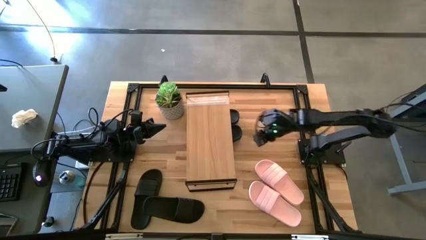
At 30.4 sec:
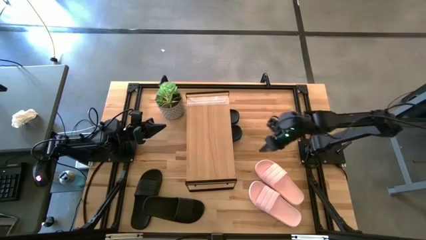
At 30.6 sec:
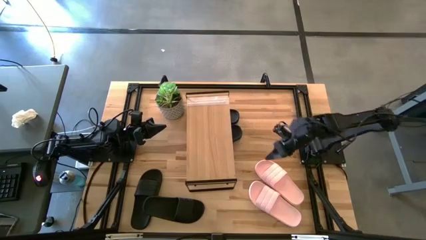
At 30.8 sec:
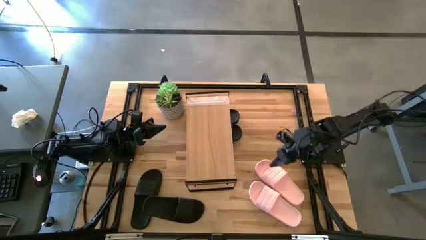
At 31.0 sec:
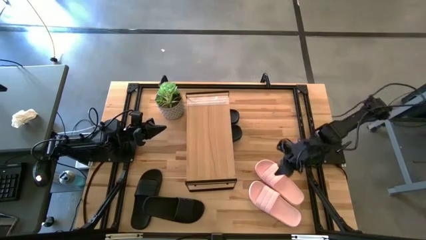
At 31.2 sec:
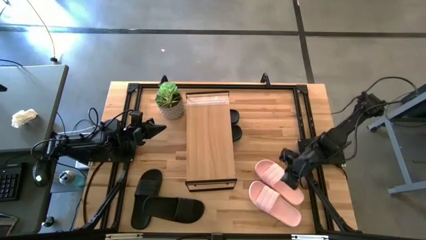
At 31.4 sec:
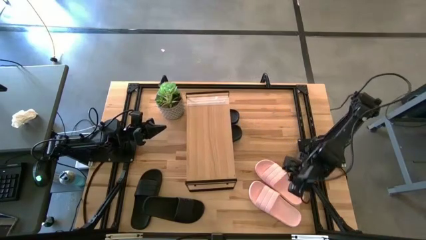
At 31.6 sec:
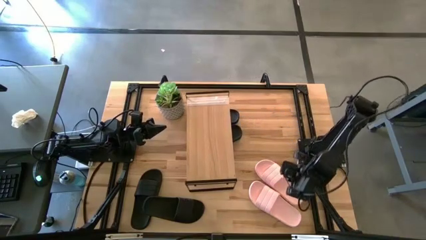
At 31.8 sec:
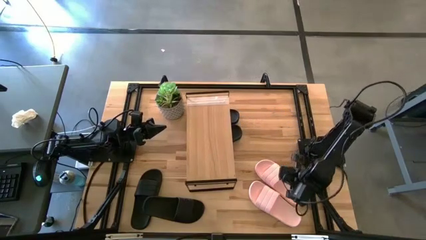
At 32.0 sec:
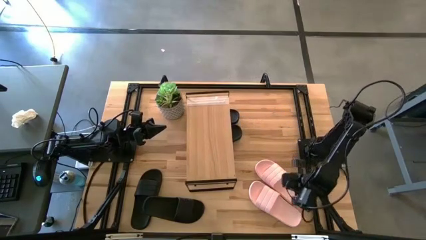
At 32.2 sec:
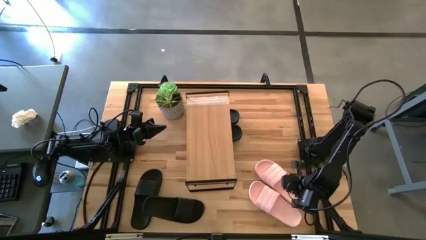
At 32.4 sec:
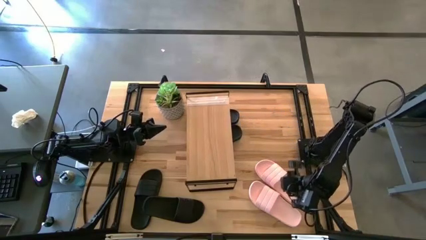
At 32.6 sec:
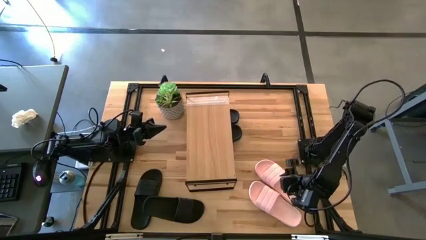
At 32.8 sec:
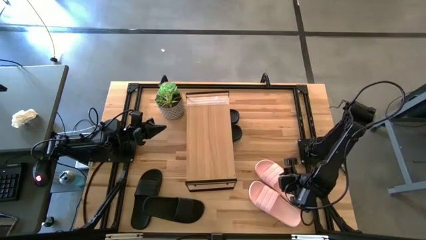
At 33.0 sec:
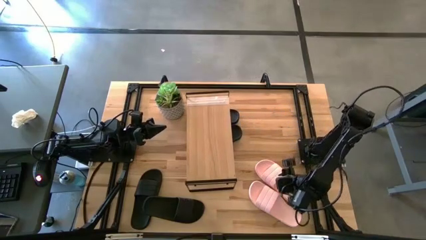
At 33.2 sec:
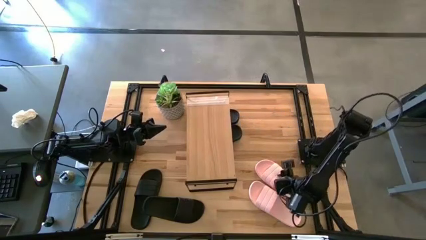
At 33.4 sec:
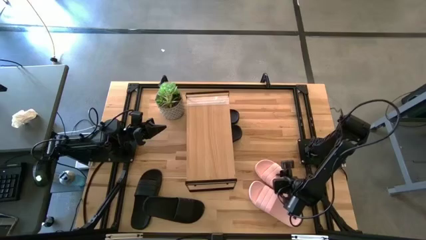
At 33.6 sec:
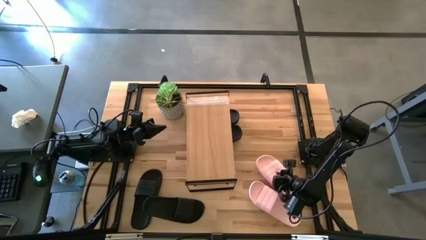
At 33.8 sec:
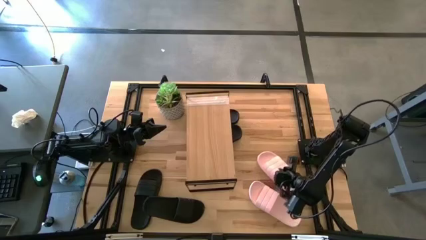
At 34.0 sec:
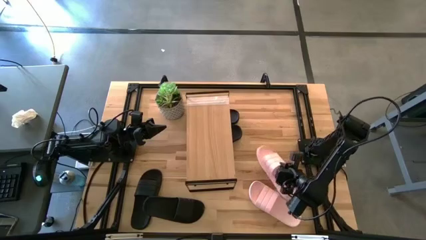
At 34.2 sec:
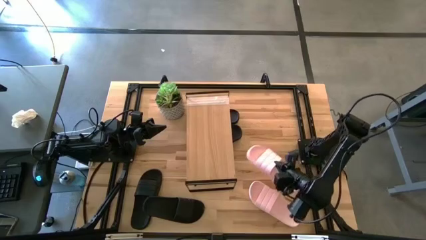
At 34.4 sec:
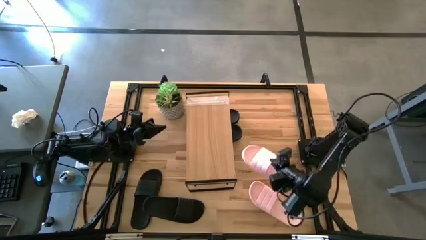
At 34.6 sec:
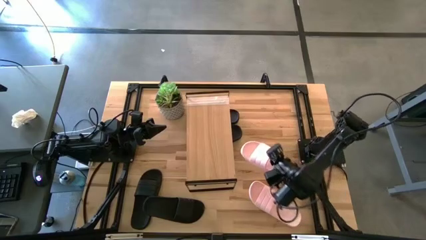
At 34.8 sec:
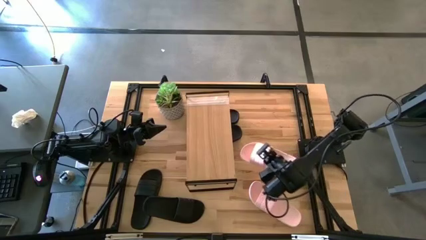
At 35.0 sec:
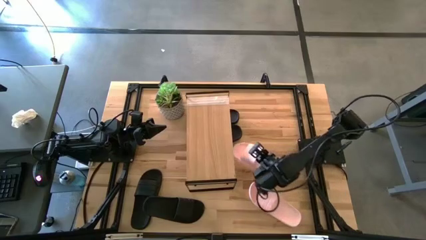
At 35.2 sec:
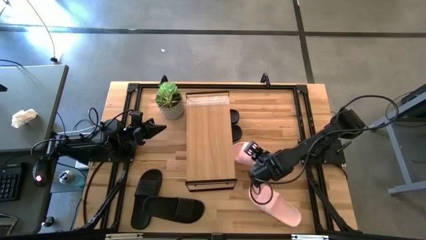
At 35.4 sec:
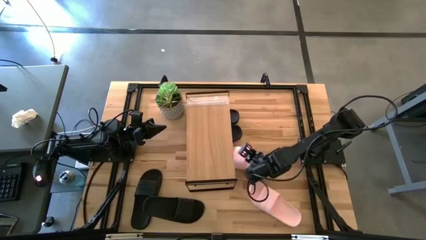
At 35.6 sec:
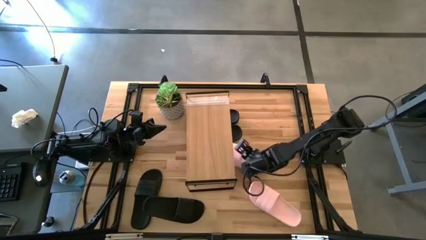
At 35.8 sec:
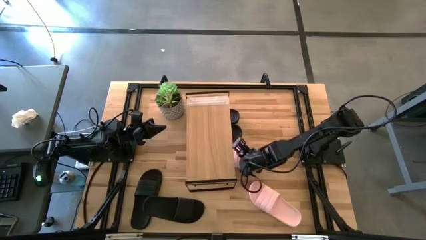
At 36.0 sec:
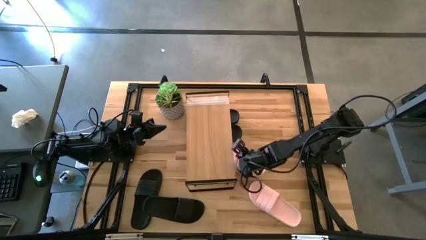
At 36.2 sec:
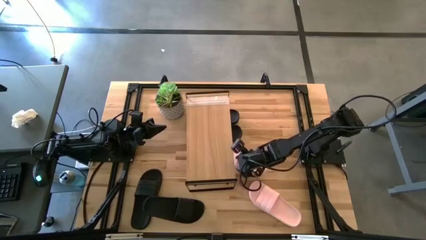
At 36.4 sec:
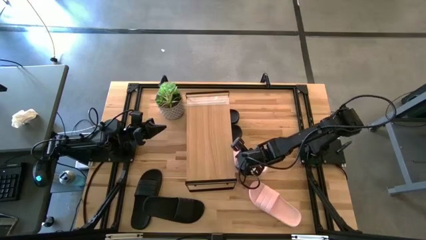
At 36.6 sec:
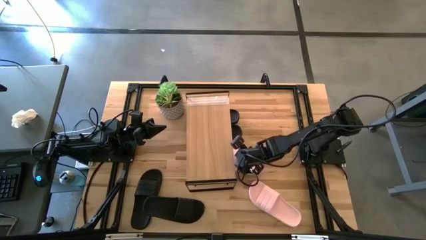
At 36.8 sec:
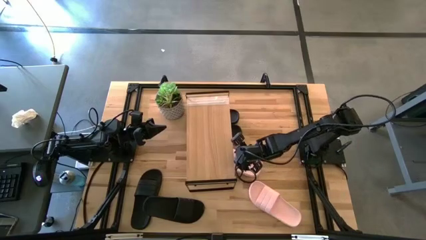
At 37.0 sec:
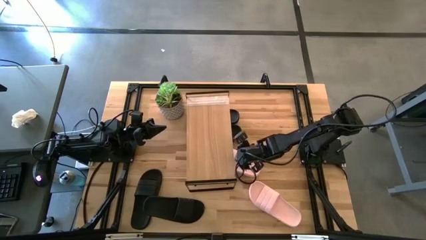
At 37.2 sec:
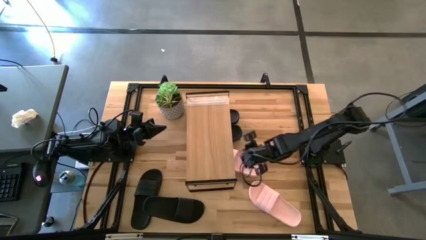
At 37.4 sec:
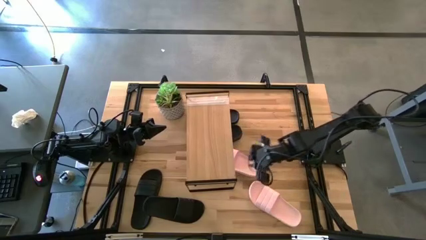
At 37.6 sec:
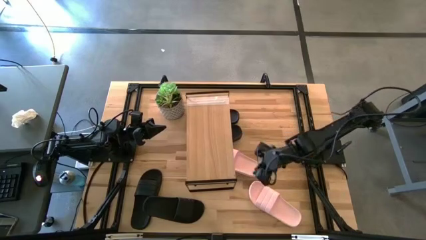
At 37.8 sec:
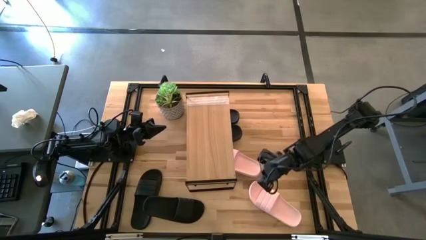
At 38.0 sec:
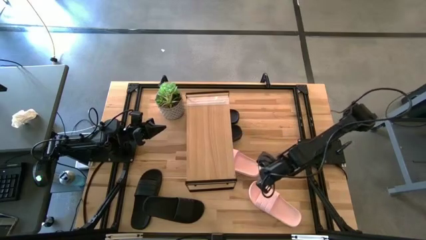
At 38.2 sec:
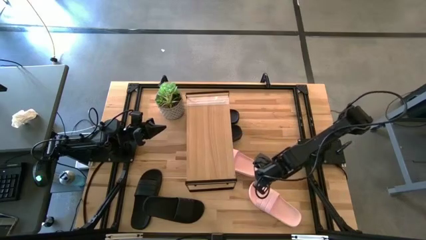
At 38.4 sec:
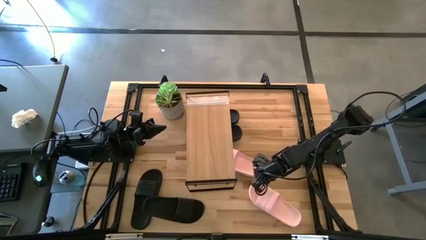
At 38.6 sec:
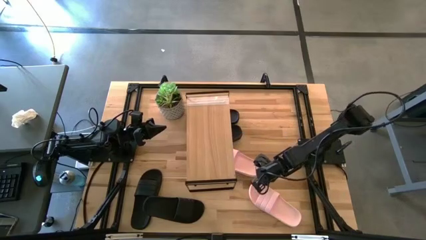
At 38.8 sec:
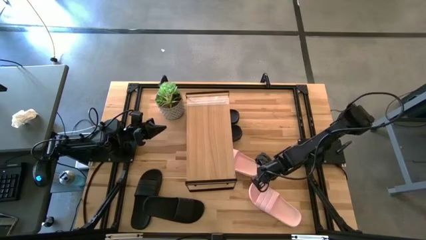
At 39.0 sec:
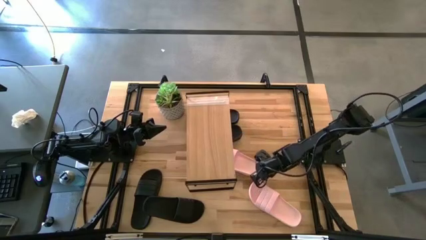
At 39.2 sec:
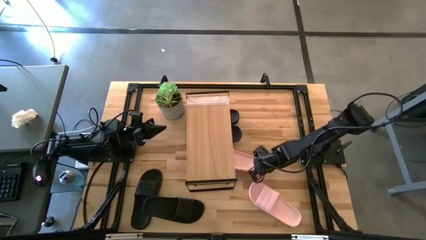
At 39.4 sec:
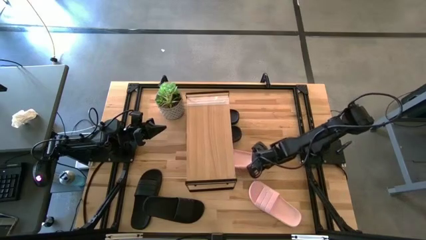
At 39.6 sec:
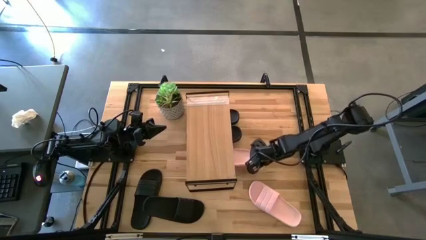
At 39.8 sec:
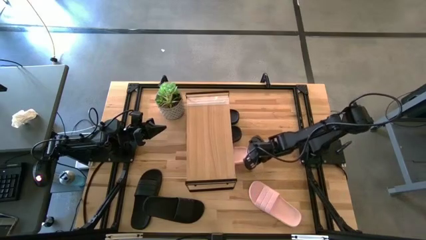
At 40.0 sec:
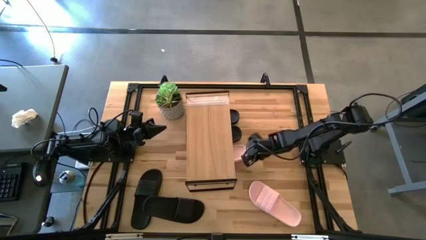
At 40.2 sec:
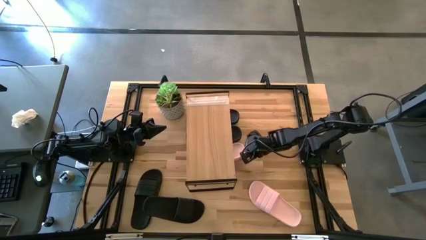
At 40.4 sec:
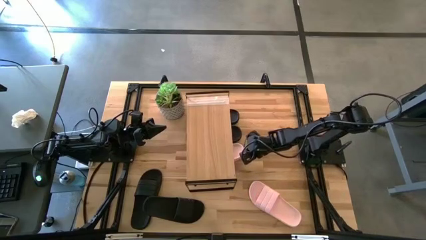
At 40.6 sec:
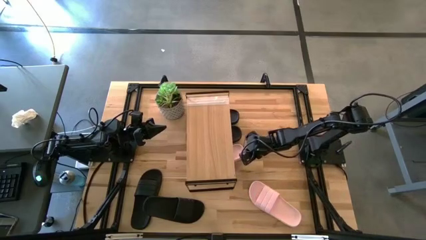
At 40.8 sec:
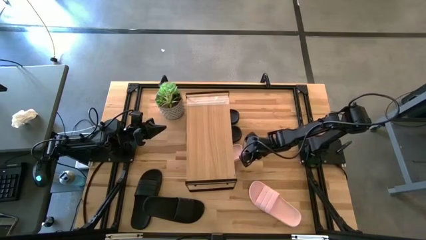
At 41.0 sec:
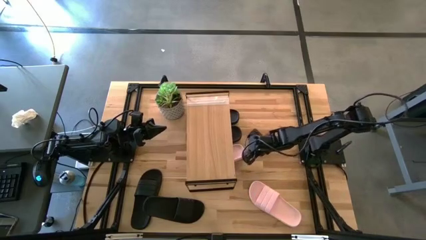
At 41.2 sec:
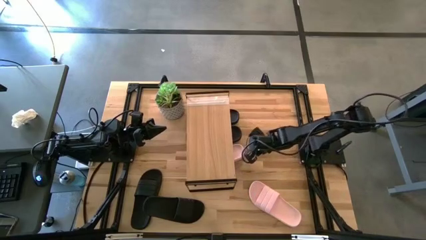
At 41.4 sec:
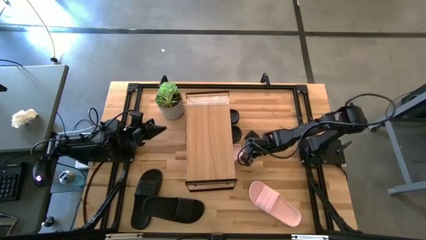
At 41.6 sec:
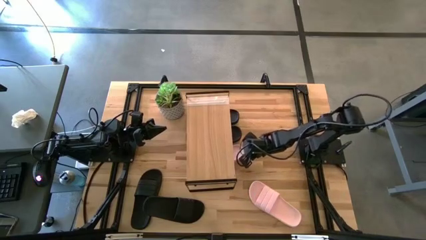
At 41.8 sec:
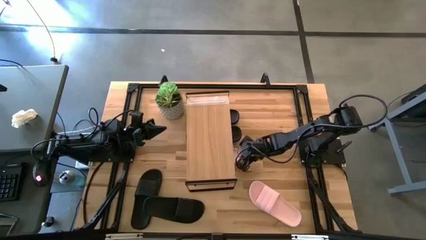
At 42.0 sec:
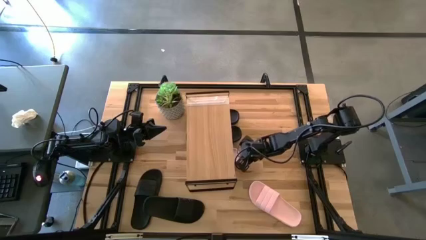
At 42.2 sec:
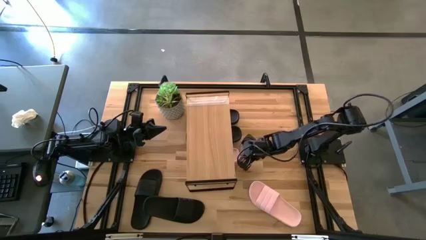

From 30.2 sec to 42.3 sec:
Task: Pick and place slides into the shelf
Move the top pink slide under the shelf
